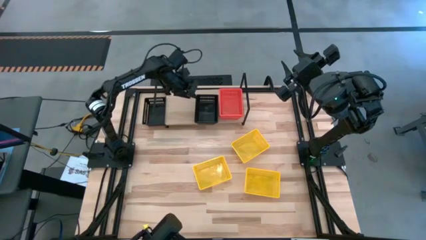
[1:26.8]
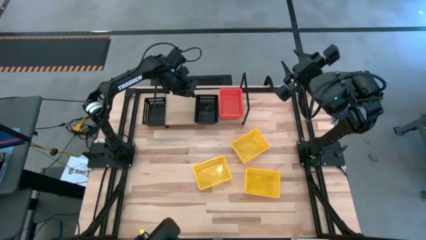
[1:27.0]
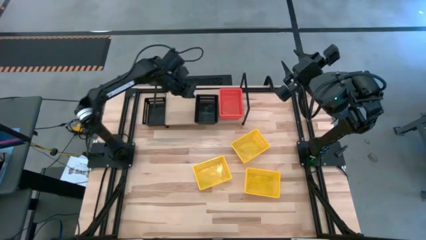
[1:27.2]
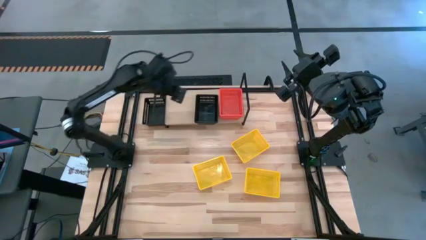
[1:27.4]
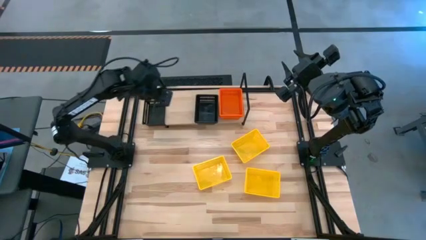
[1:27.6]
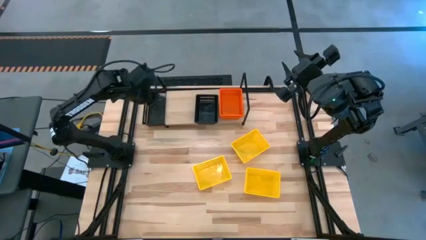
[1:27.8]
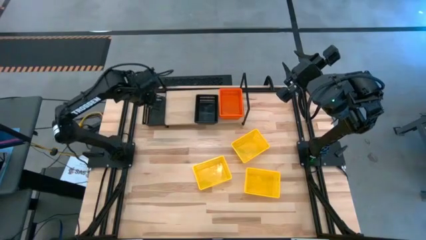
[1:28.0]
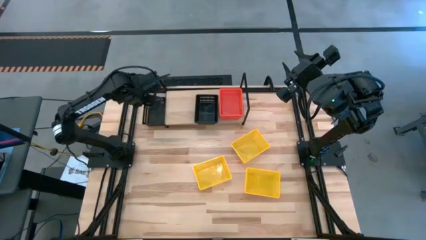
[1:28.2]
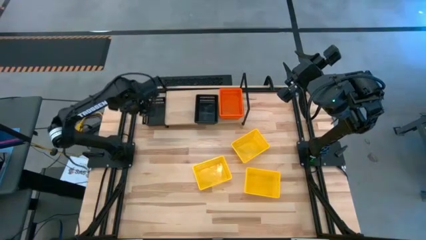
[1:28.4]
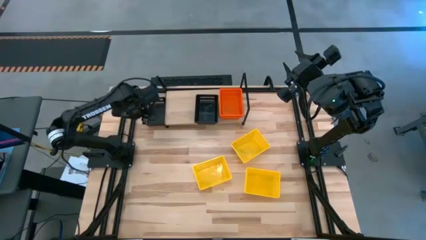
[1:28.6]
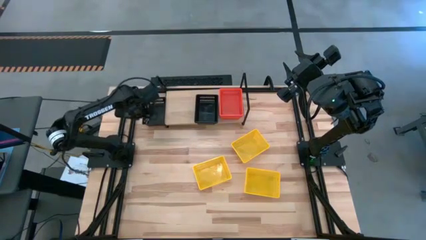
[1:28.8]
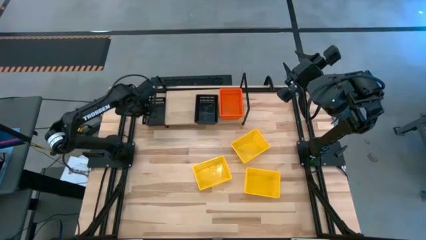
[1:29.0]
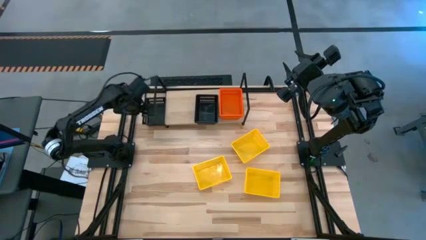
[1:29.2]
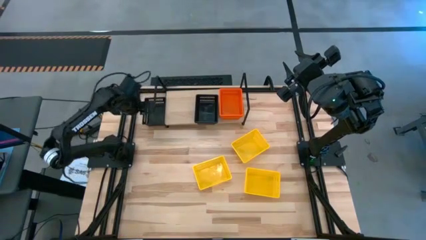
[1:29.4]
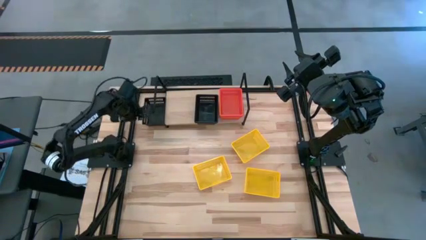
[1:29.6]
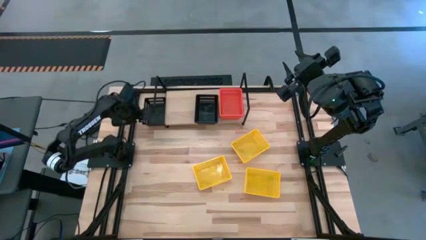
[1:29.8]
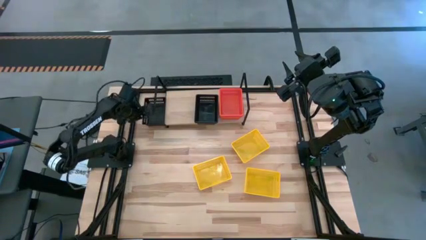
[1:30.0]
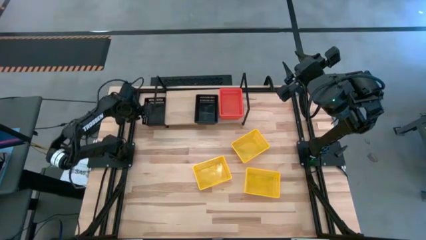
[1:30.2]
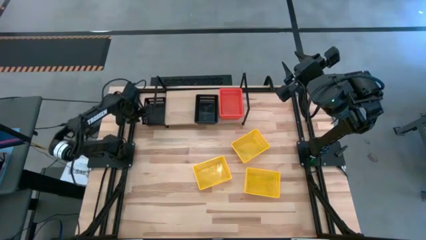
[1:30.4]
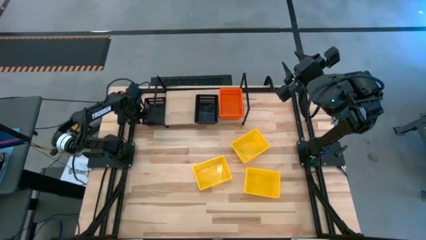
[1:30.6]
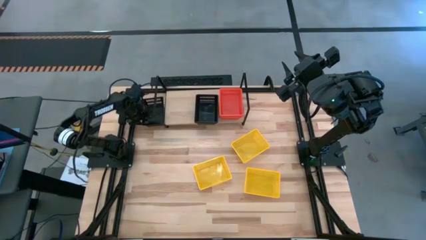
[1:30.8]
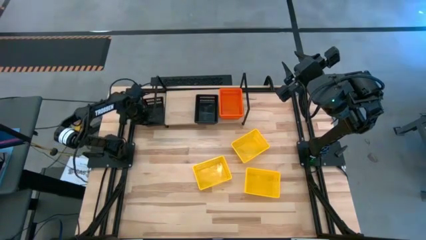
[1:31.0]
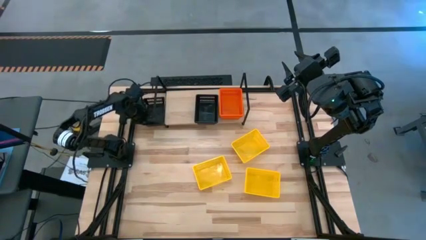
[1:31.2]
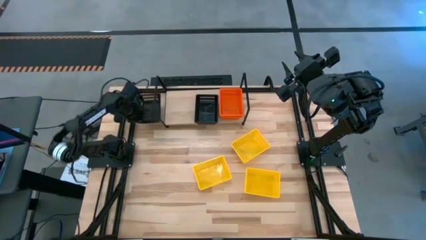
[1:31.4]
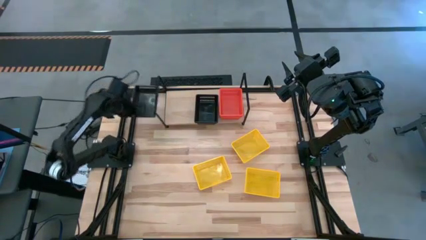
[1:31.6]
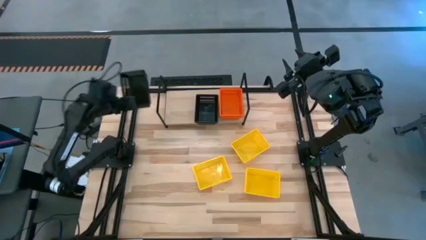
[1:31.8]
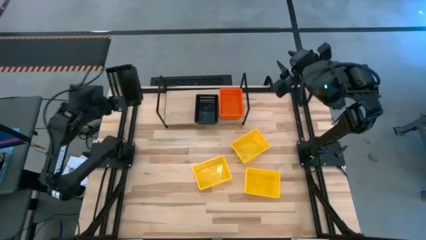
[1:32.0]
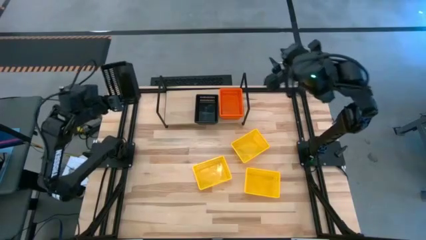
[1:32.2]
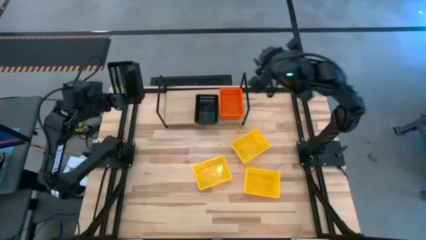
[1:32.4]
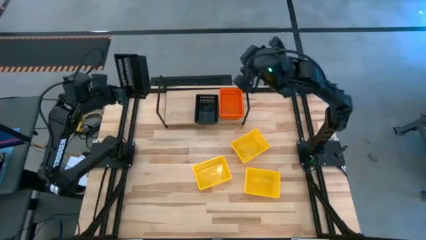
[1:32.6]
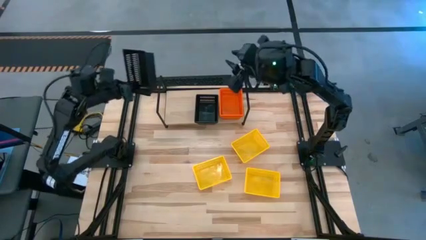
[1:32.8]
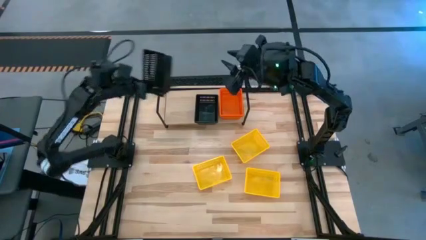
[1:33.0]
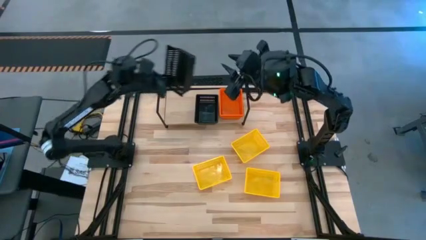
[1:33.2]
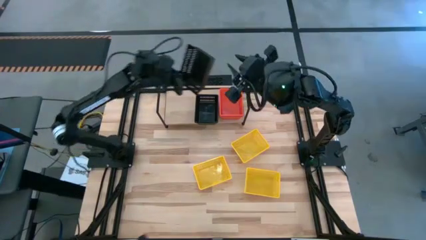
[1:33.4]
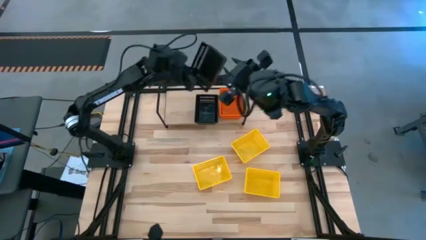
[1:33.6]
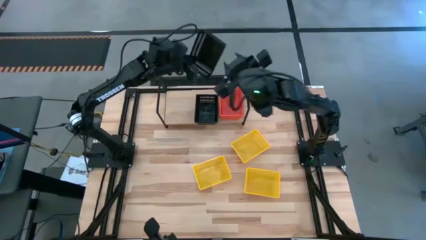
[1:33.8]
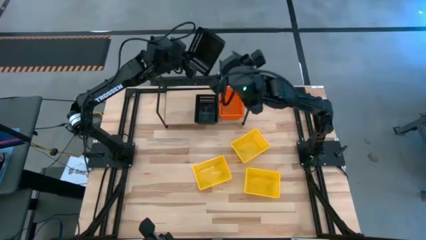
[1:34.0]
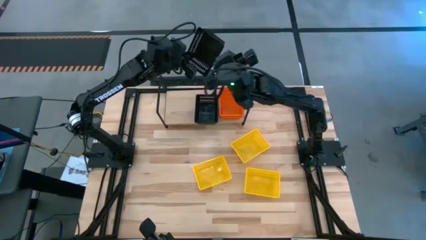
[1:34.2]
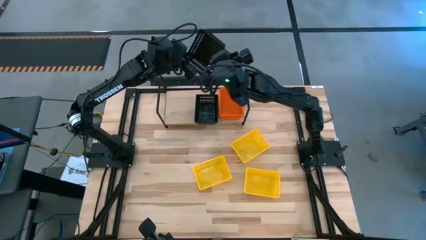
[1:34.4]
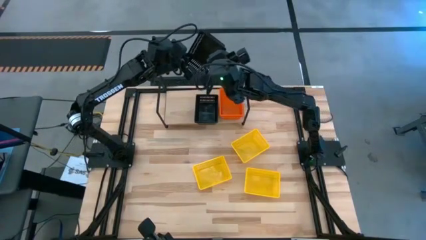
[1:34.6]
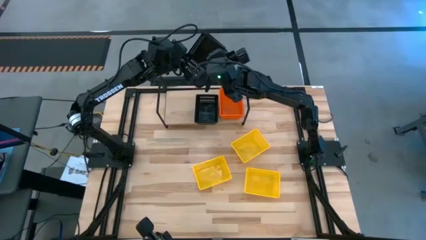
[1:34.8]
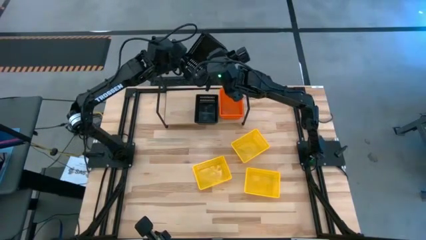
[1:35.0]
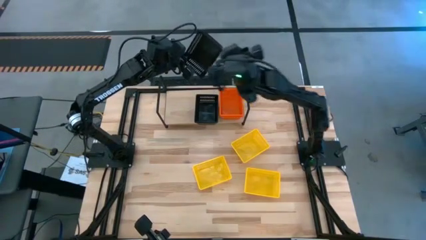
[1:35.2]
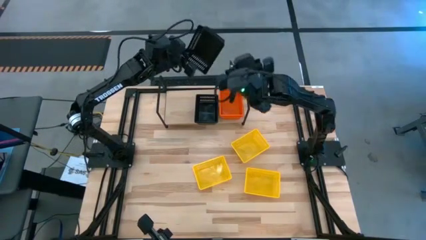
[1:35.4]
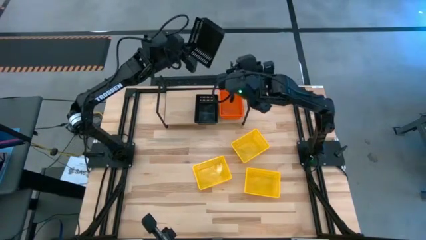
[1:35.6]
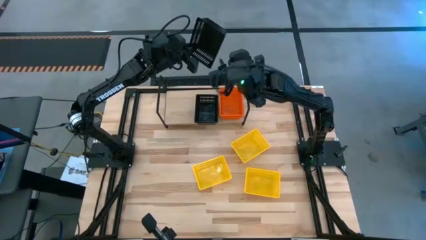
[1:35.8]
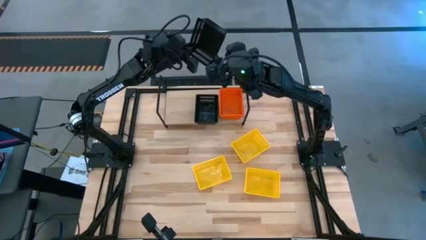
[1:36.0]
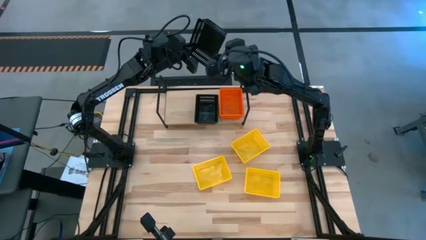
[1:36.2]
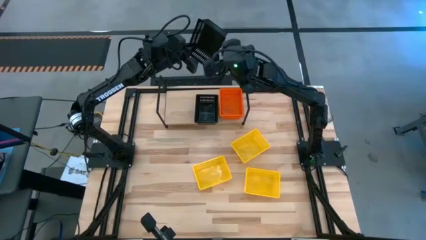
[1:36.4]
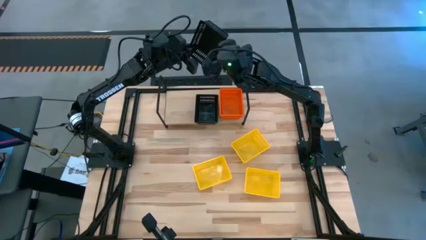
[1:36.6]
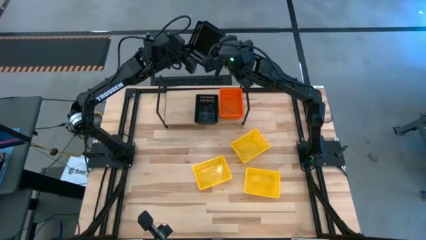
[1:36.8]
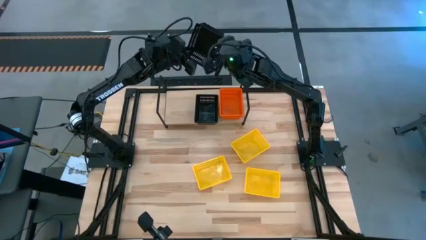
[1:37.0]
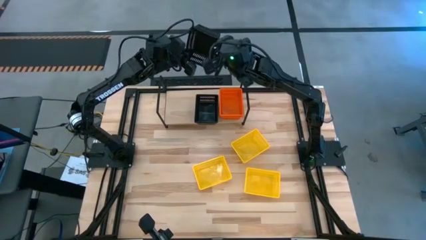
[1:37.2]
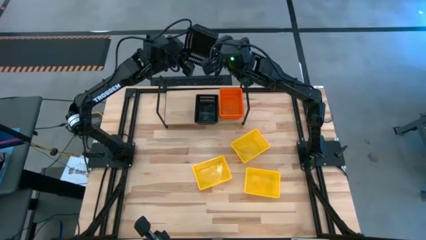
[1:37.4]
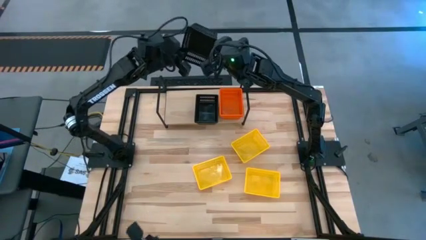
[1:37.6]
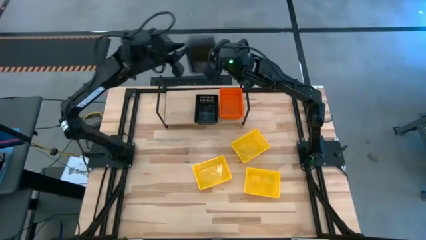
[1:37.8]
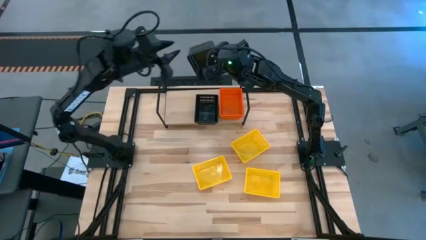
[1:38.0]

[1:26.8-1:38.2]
Task: Stack baskets on shelf by color
Stack the black bin on top of the black bins on the shelf
